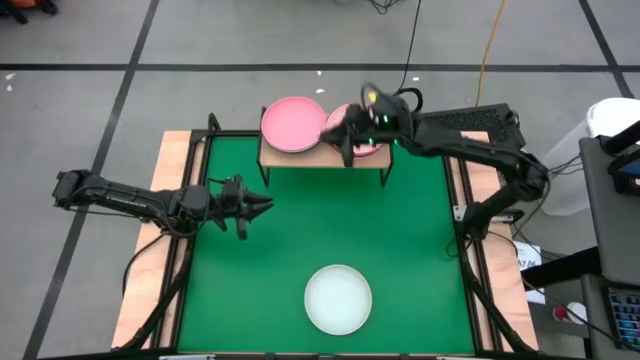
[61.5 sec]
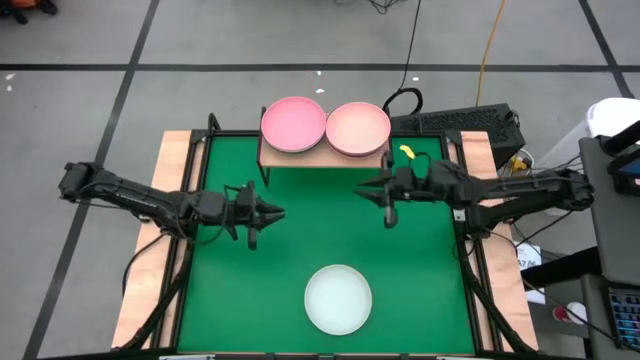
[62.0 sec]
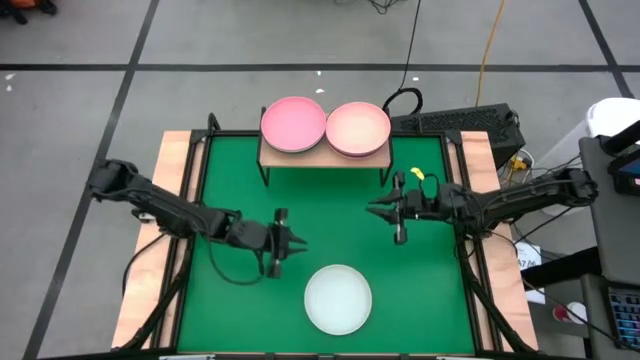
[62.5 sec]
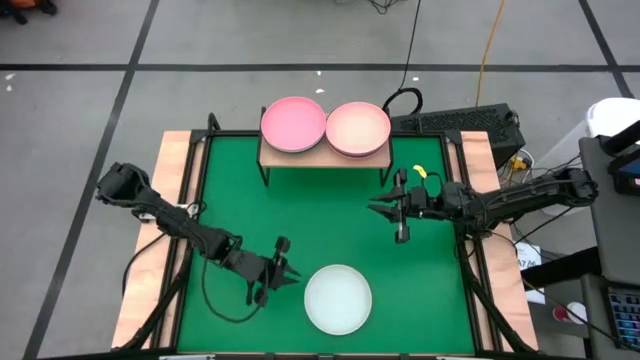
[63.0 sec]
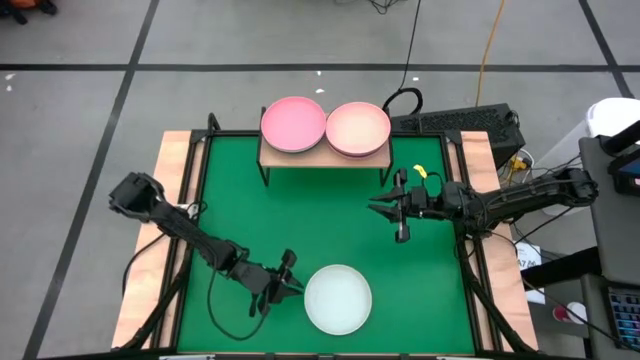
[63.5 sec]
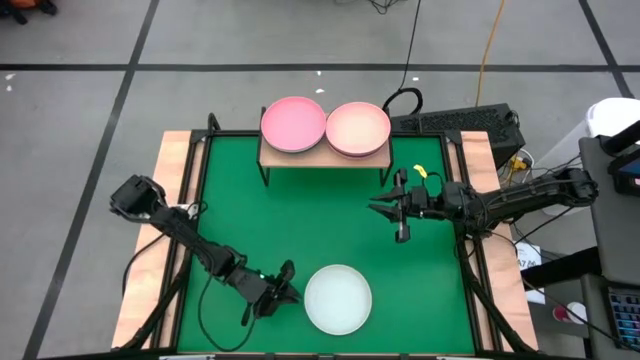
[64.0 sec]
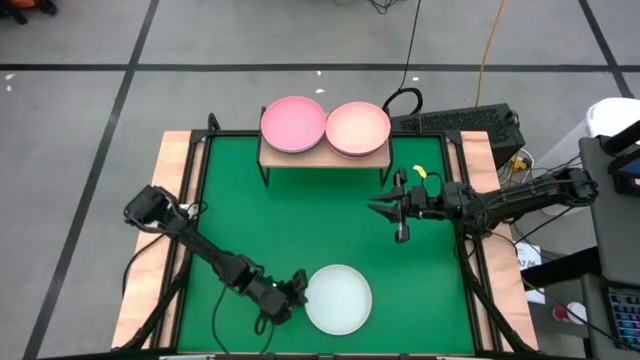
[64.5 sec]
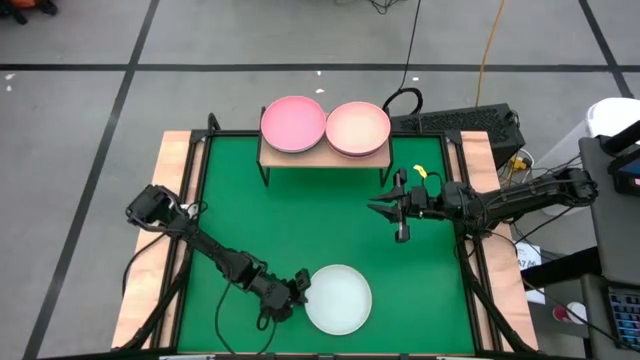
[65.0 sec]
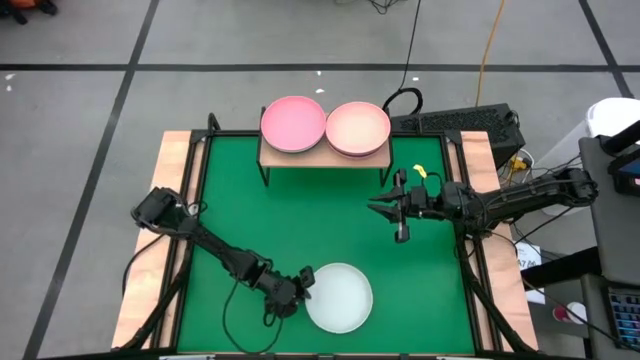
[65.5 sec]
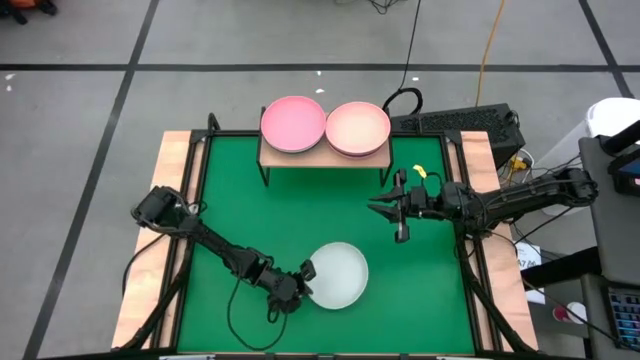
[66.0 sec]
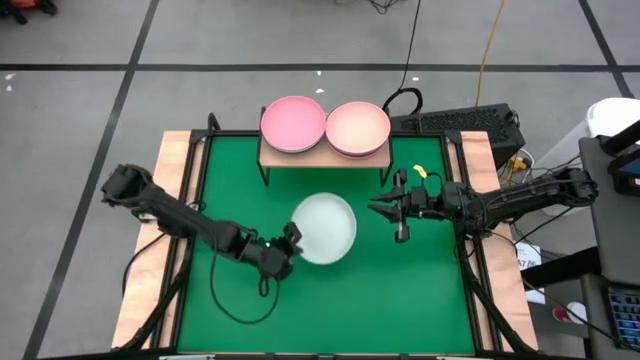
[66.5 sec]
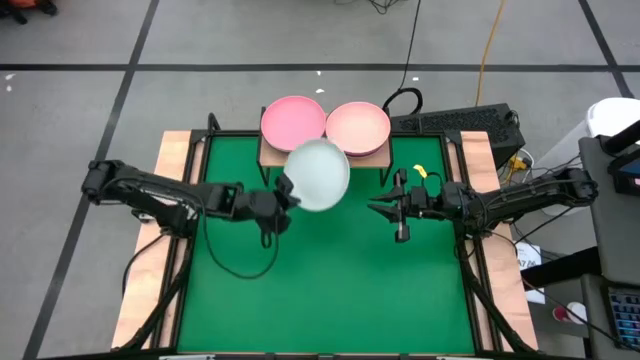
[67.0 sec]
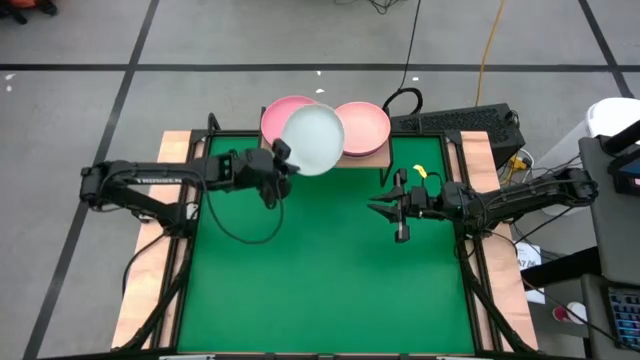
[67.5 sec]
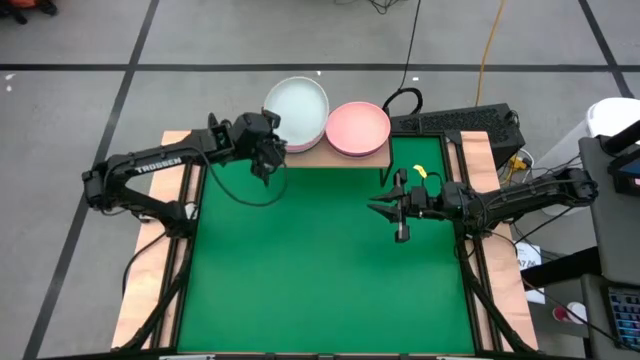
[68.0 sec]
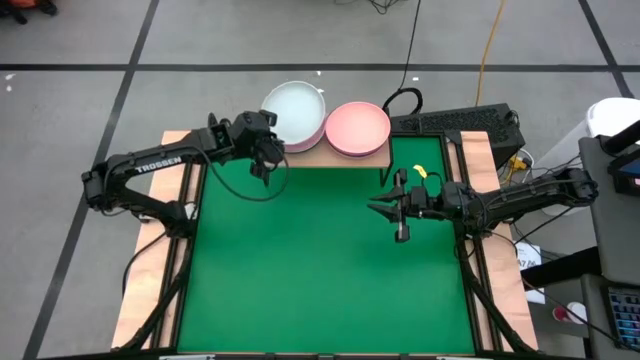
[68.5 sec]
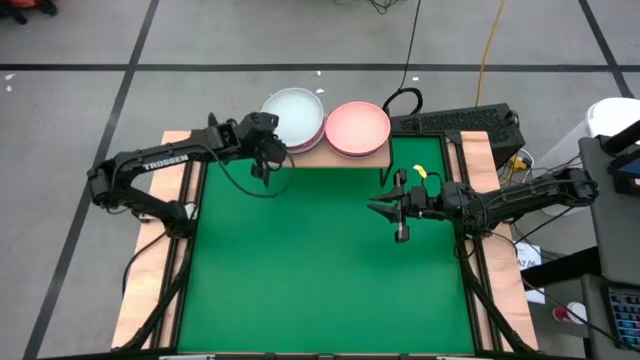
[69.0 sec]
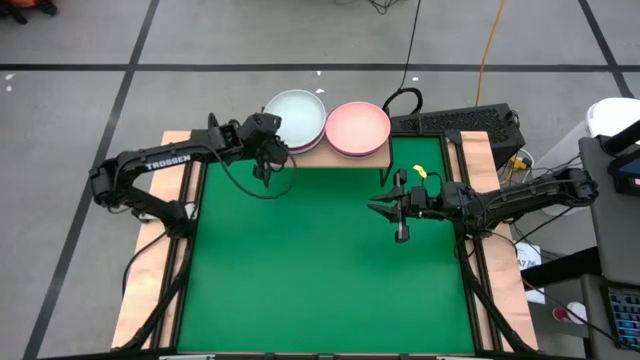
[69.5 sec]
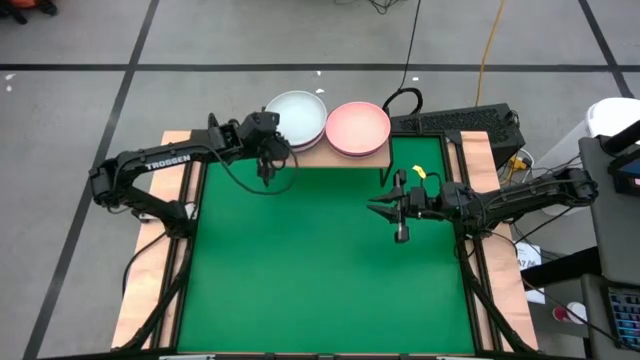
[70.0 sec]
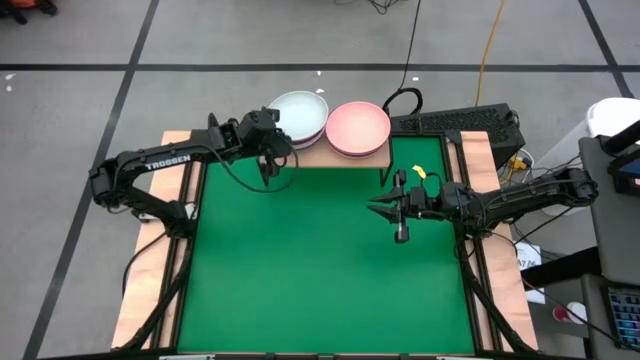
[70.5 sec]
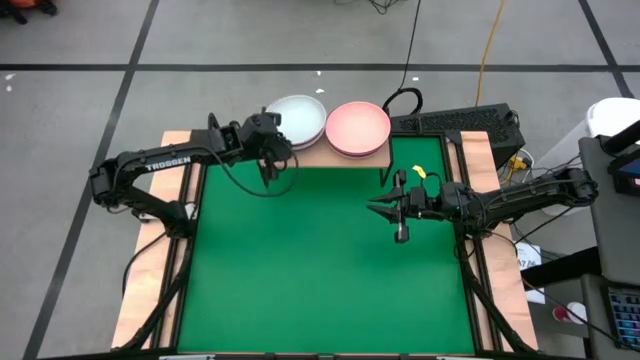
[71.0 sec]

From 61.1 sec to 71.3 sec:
Task: Place and stack plates onto a shelf
Stack the white plate on top of the light pink plate

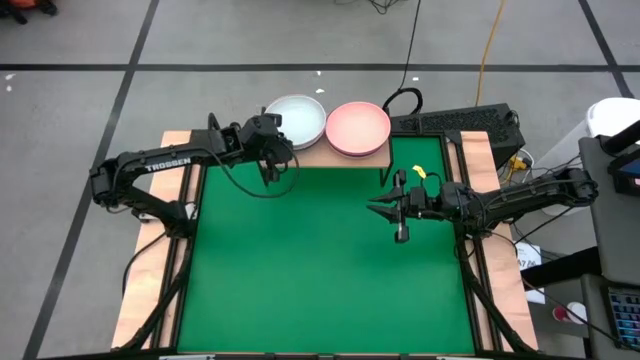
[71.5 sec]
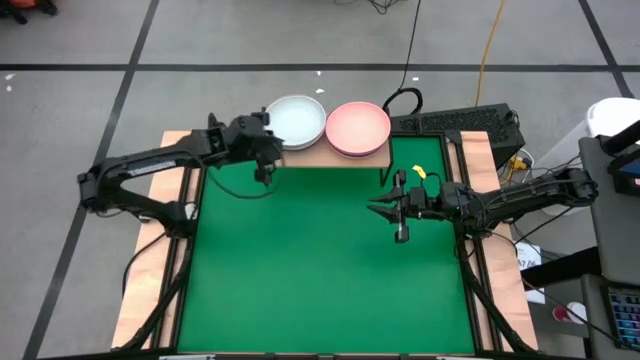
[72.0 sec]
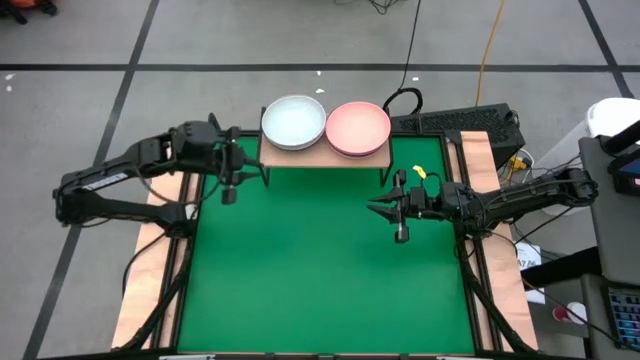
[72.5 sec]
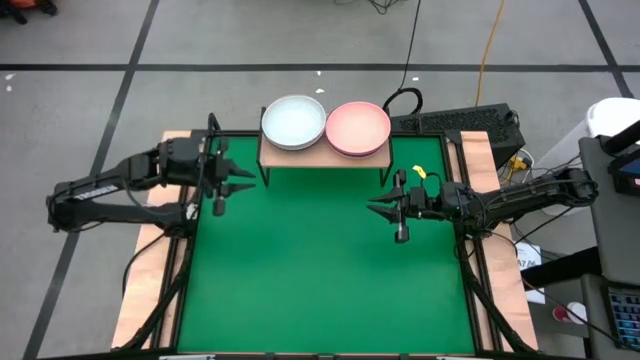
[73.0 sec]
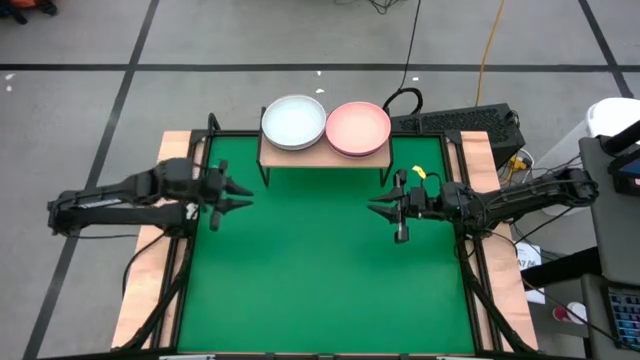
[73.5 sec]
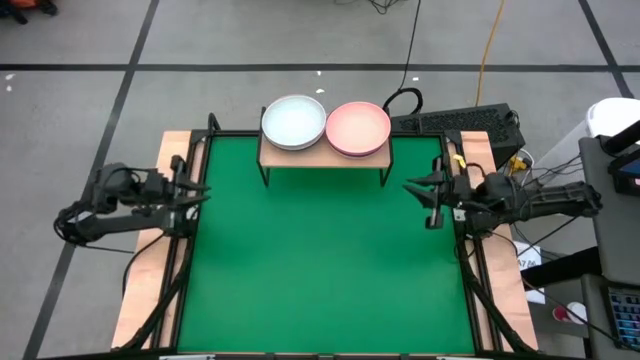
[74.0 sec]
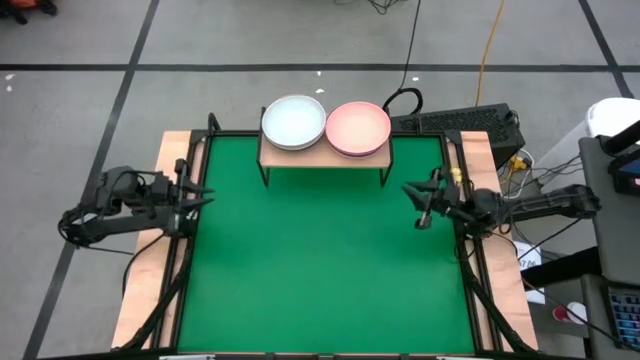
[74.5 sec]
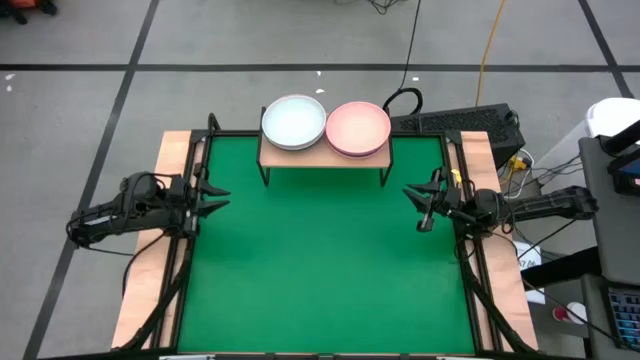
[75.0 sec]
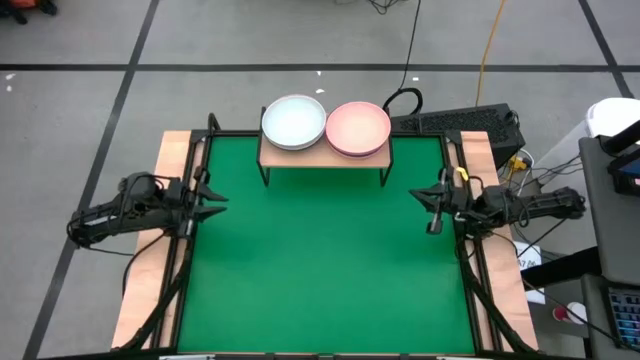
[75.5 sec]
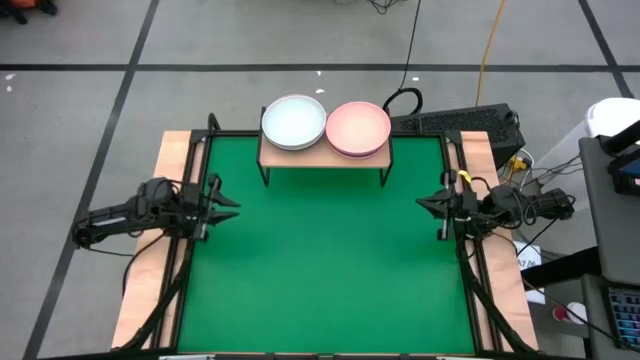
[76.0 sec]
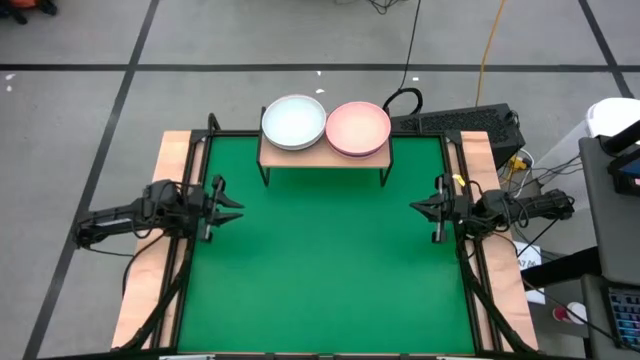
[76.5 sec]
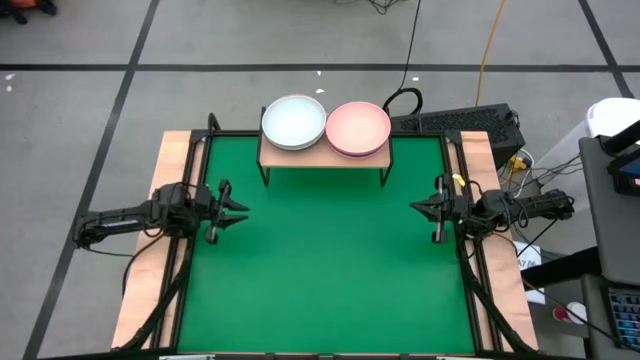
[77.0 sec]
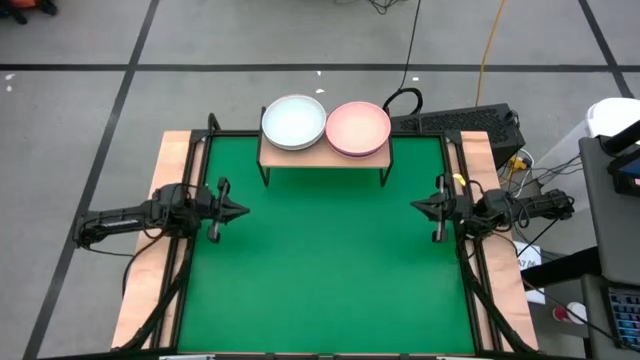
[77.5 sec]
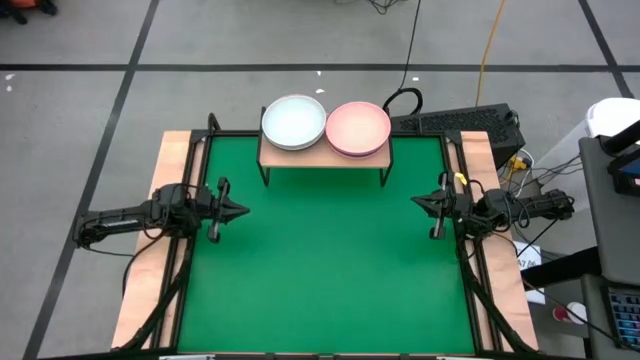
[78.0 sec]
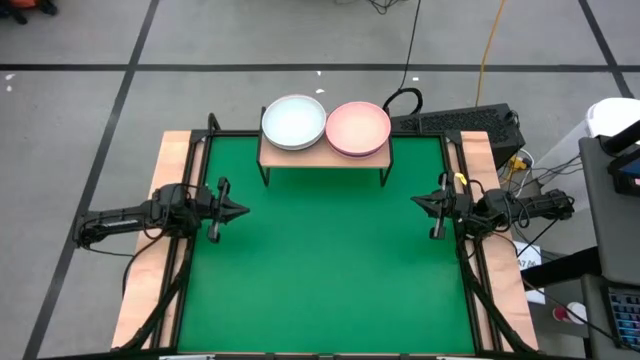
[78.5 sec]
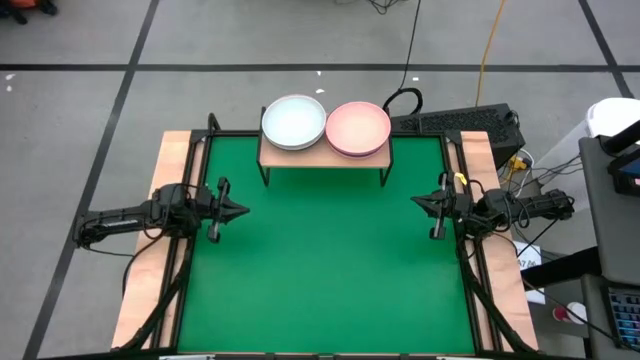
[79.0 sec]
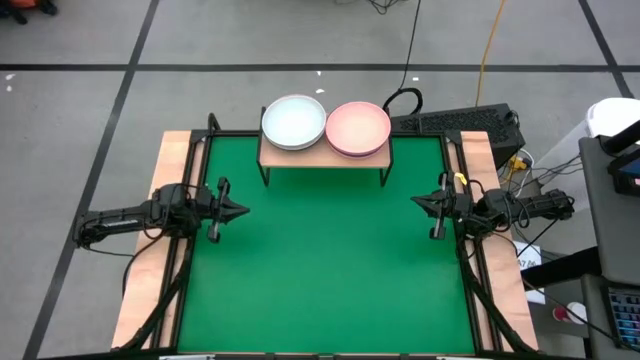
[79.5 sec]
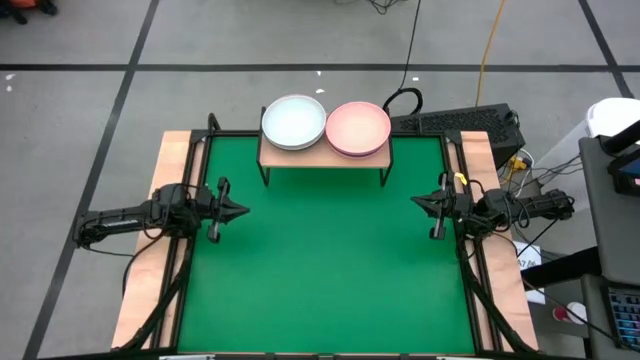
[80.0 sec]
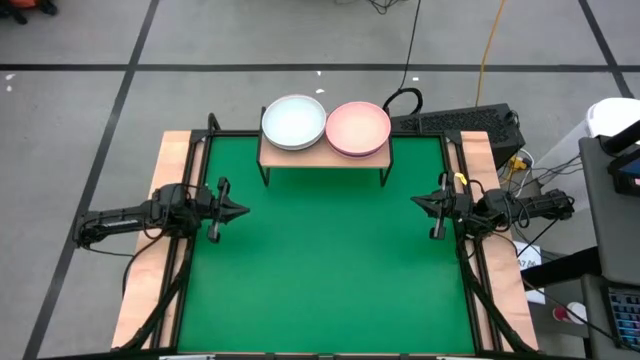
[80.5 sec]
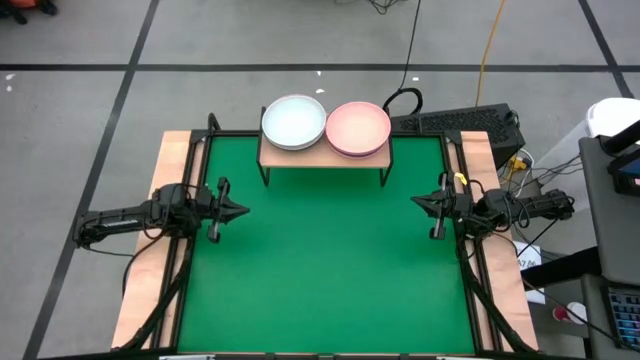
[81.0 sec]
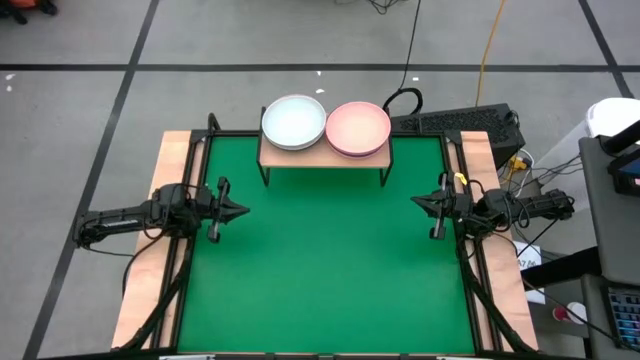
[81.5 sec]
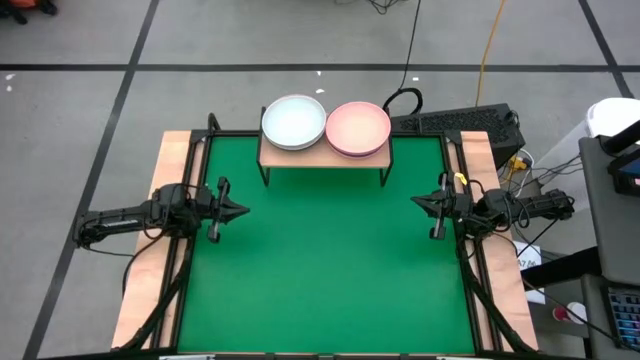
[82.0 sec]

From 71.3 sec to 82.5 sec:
Return to Home Position

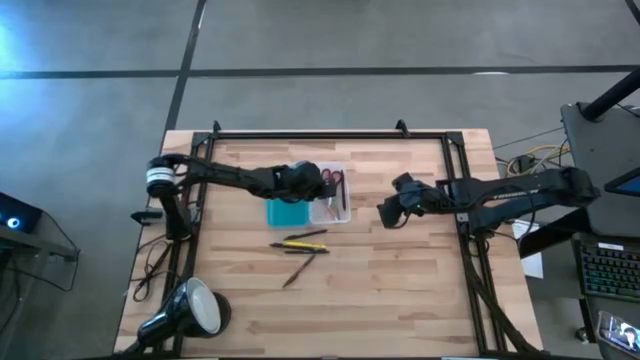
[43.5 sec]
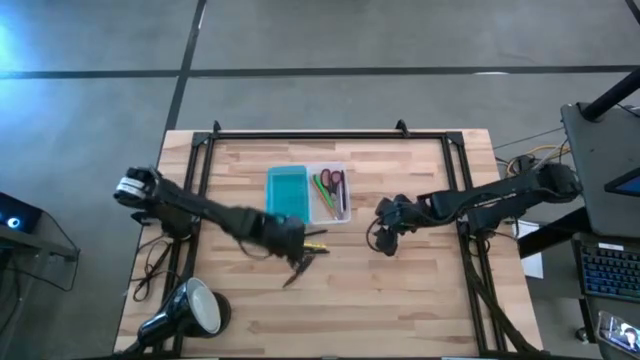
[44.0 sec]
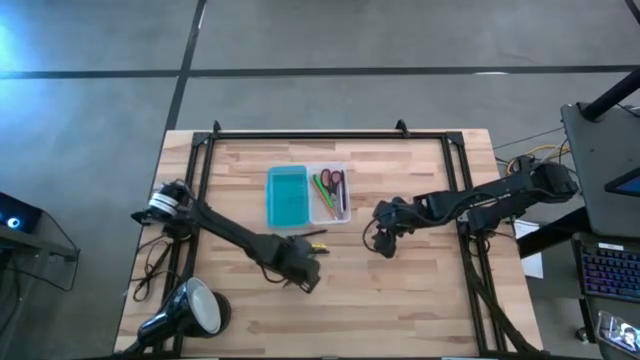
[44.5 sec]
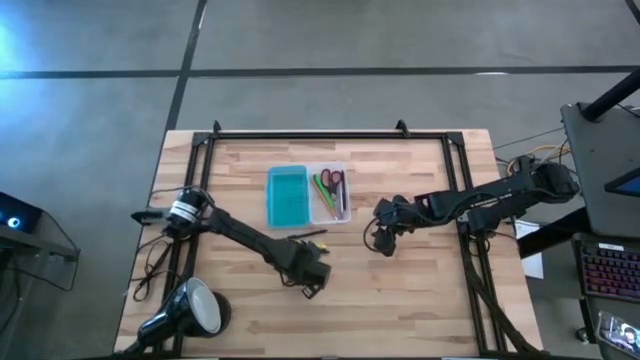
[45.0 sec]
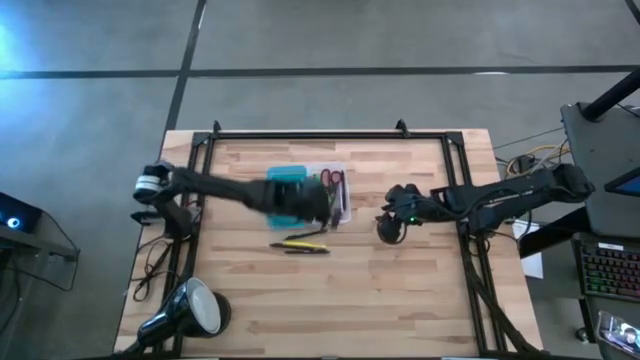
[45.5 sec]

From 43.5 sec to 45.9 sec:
Task: Pick & place school supplies into a supply box
Put the brown pen into the blue supply box
